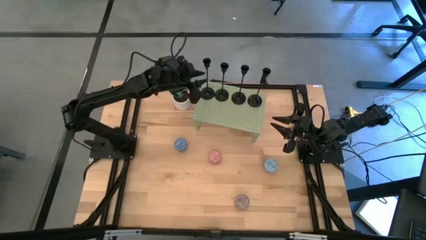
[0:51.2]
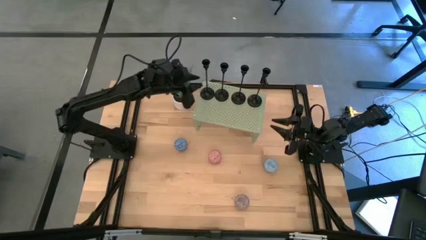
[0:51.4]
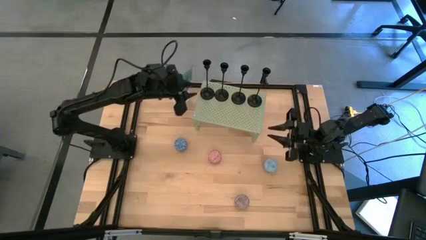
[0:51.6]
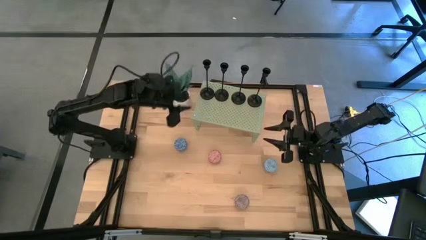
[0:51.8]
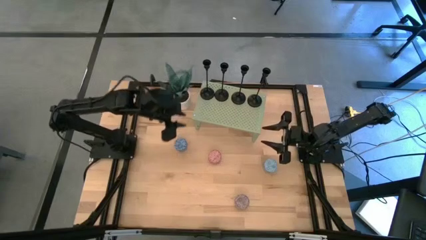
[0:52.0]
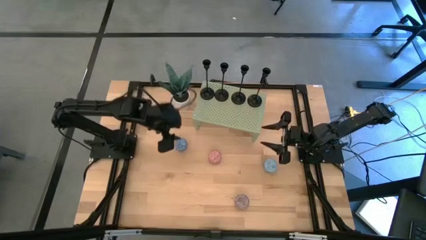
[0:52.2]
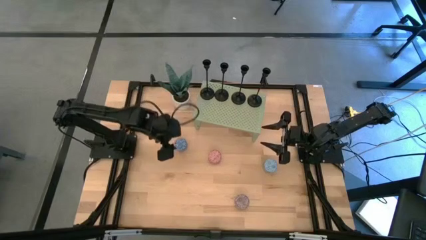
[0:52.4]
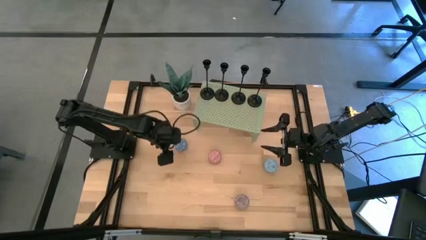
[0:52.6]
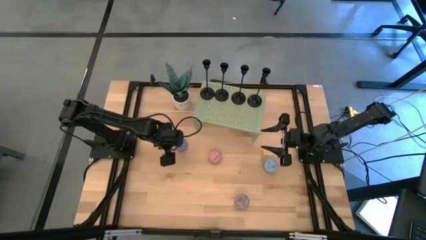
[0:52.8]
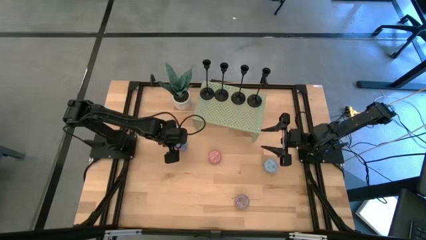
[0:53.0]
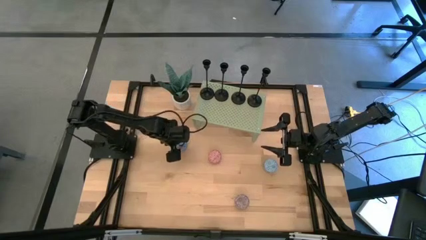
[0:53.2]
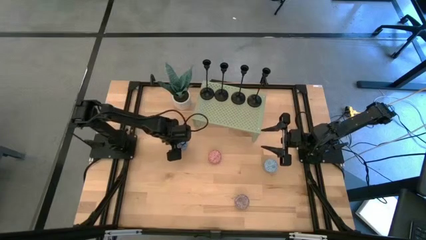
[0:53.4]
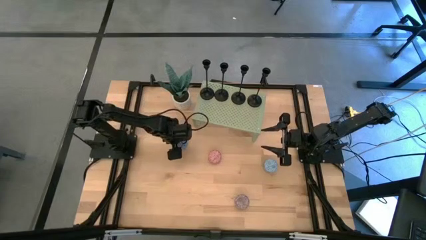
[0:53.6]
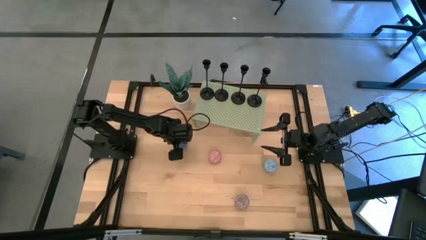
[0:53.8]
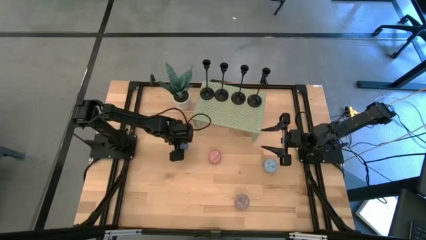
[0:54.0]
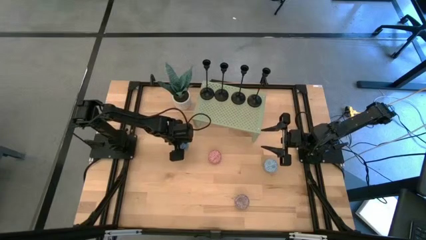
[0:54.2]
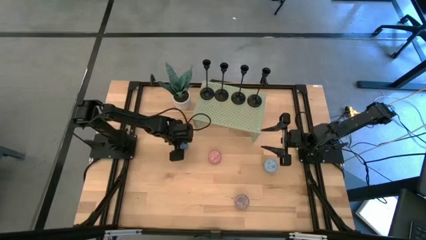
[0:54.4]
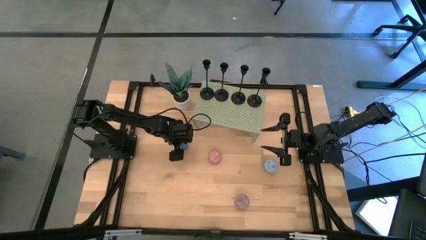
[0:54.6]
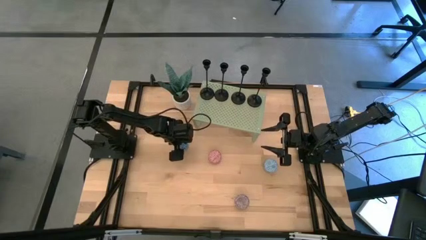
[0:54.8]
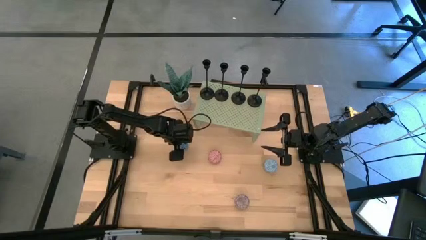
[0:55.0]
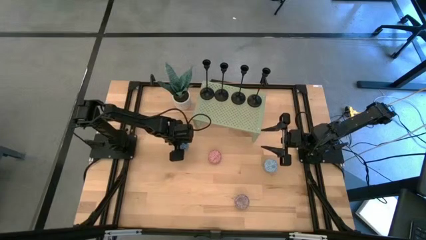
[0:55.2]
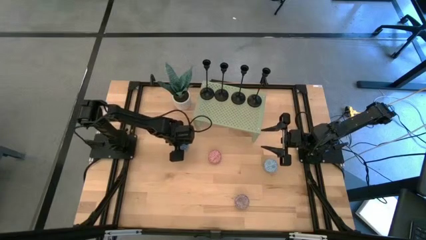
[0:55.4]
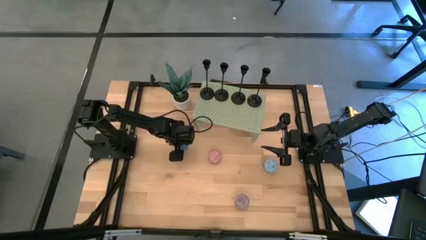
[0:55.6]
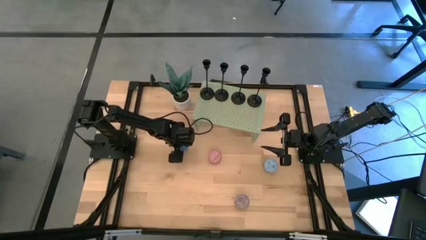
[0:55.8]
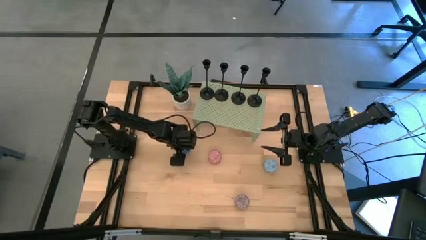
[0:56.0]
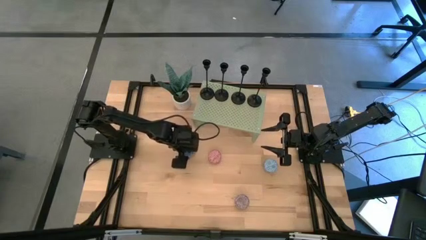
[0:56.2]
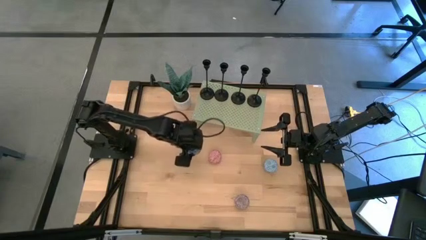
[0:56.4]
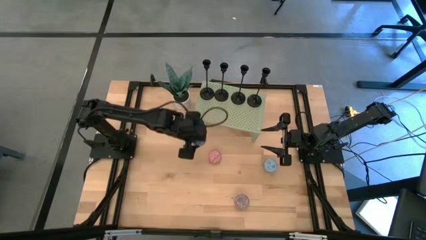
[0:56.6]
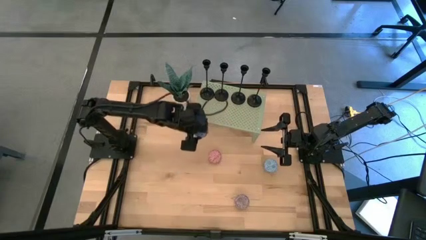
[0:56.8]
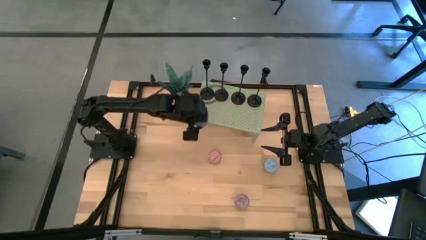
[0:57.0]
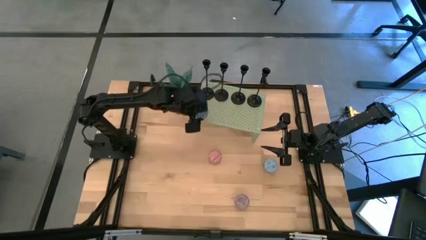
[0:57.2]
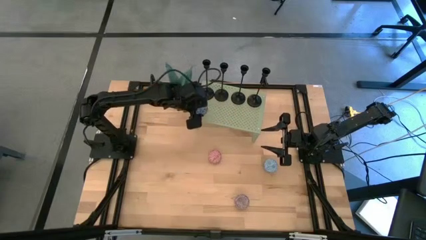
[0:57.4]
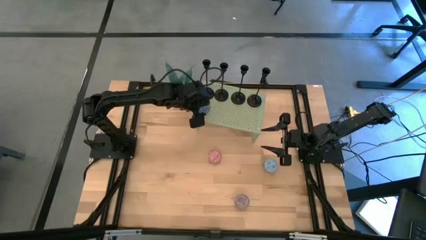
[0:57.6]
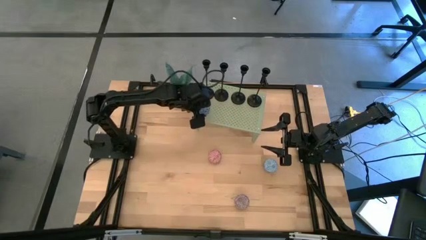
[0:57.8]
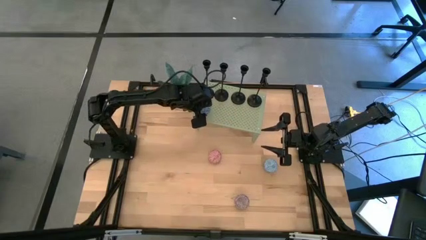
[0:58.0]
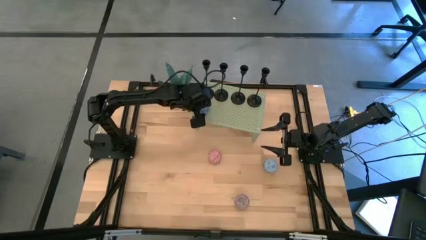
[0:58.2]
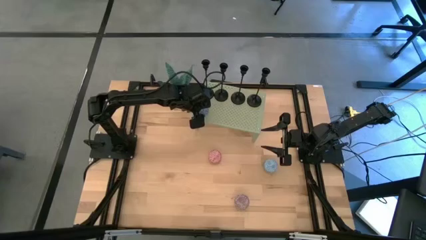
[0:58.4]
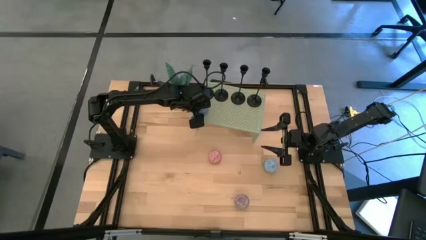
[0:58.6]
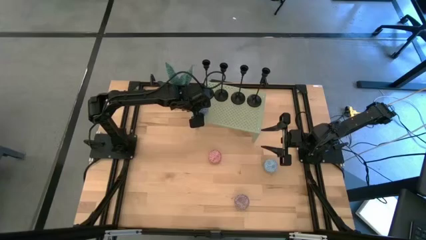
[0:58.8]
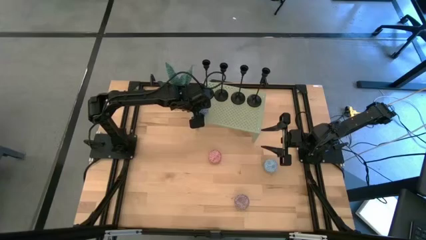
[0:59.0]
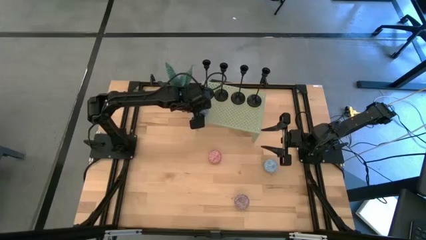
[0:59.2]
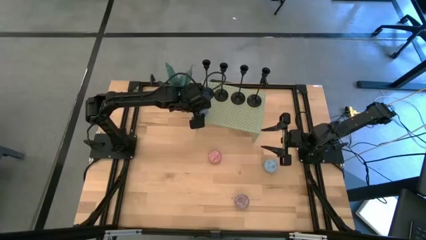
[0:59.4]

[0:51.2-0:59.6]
Task: Pick & Place candle stick holders
Put the blue scented candle on the shelf

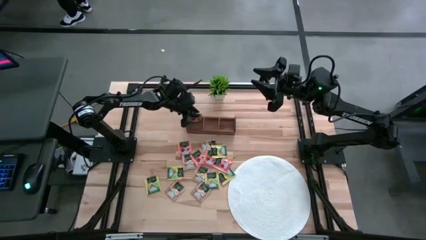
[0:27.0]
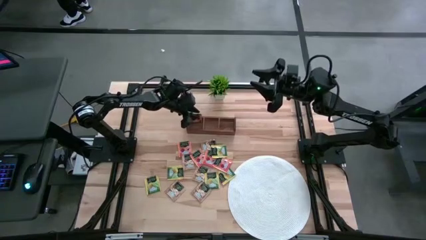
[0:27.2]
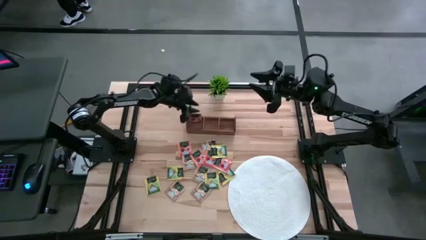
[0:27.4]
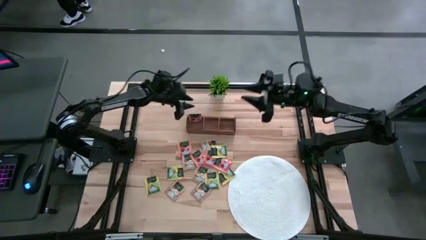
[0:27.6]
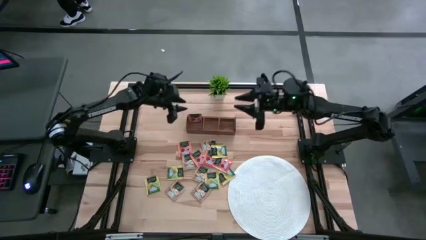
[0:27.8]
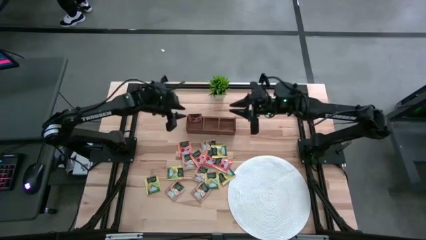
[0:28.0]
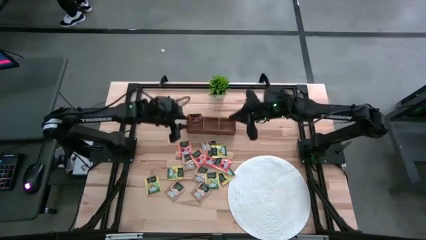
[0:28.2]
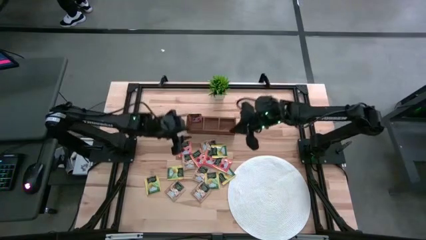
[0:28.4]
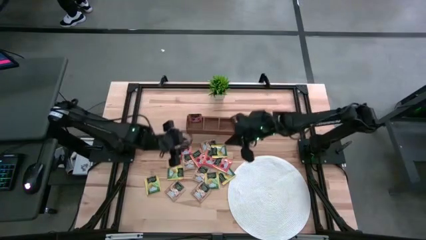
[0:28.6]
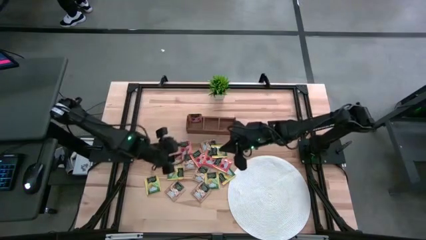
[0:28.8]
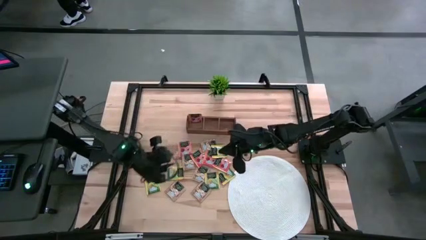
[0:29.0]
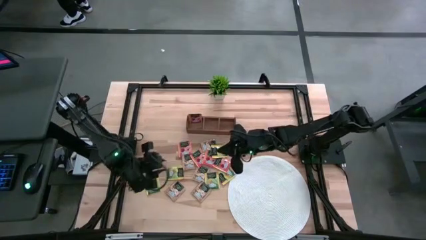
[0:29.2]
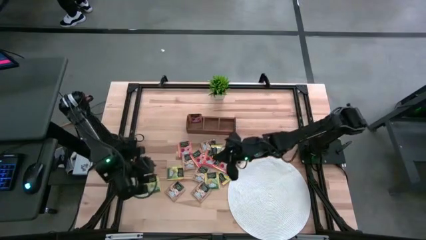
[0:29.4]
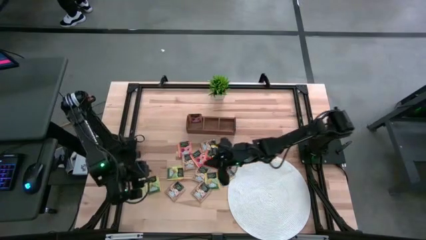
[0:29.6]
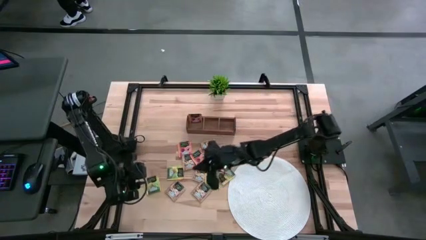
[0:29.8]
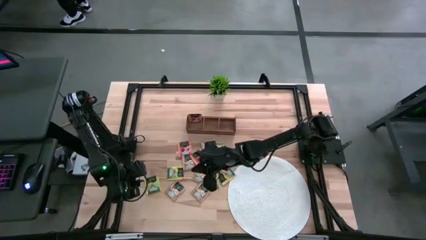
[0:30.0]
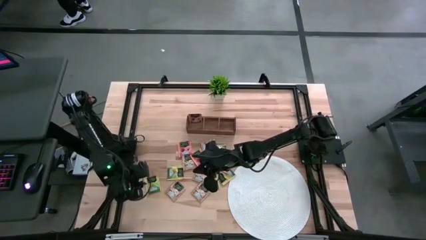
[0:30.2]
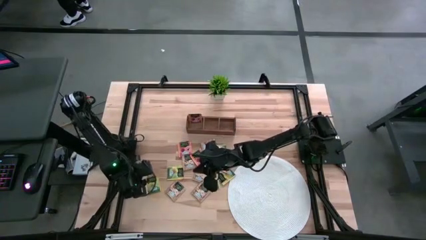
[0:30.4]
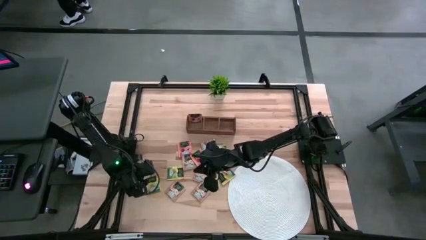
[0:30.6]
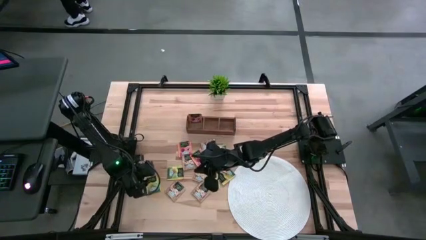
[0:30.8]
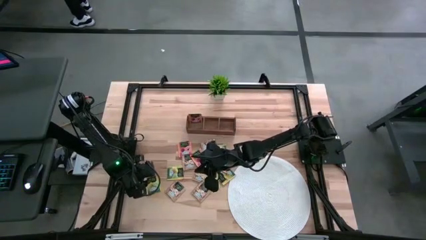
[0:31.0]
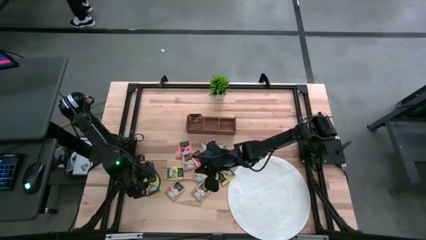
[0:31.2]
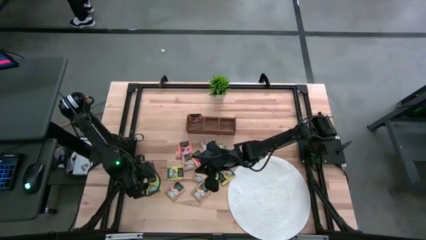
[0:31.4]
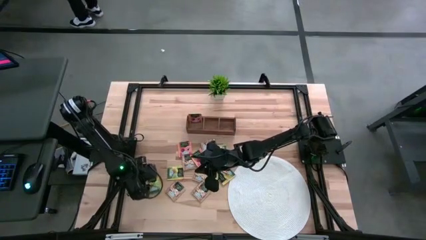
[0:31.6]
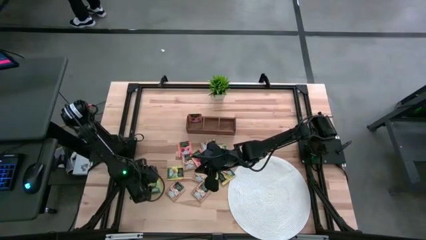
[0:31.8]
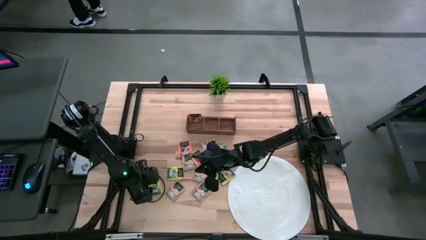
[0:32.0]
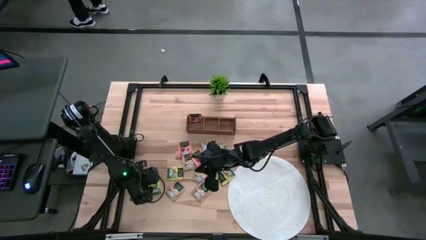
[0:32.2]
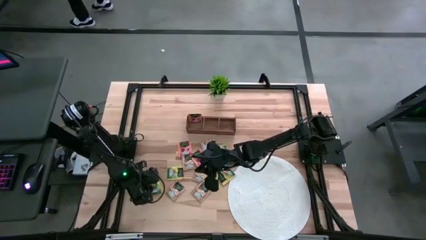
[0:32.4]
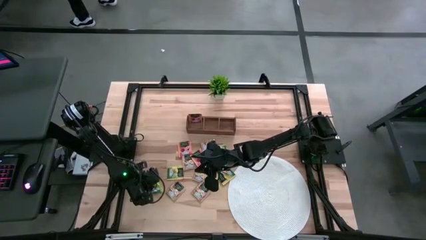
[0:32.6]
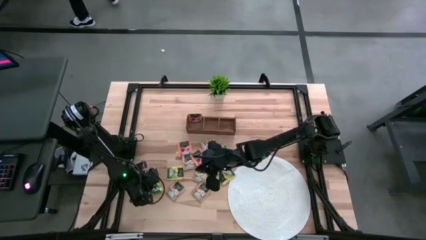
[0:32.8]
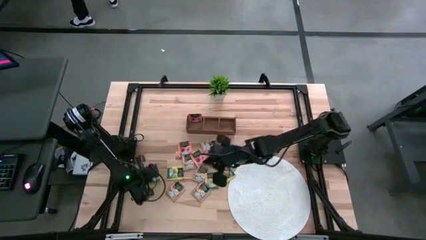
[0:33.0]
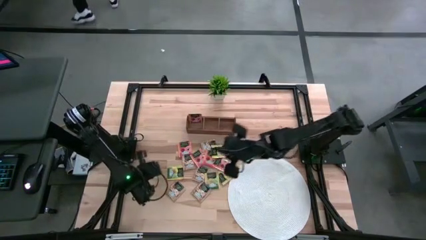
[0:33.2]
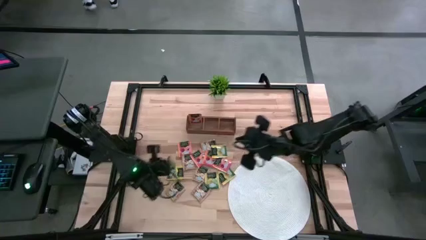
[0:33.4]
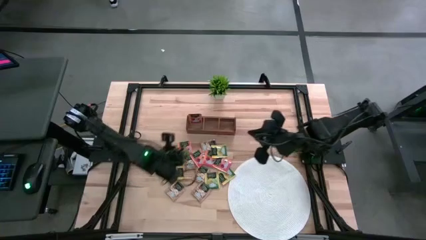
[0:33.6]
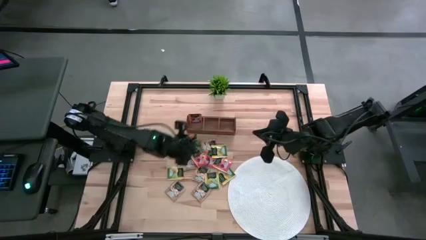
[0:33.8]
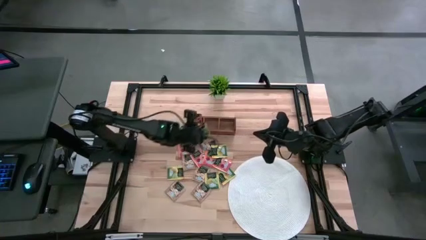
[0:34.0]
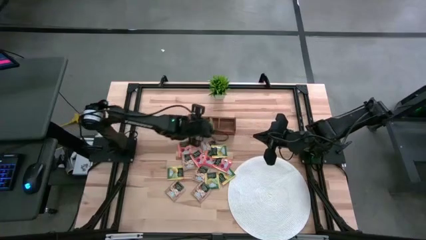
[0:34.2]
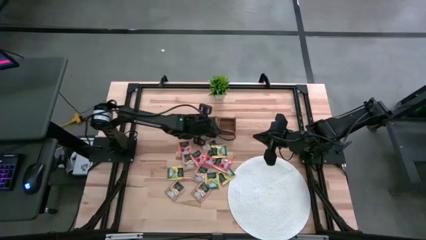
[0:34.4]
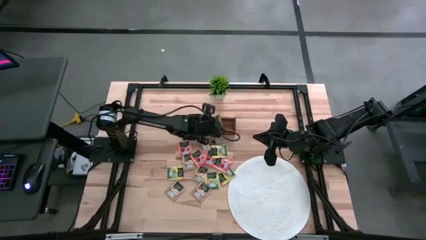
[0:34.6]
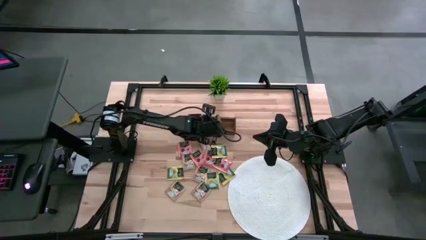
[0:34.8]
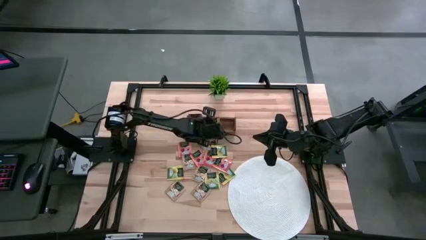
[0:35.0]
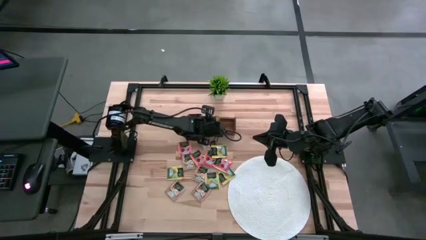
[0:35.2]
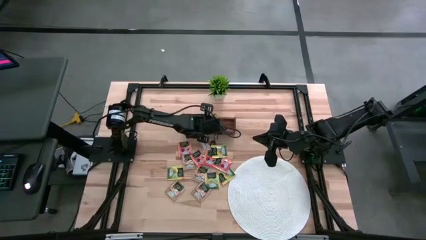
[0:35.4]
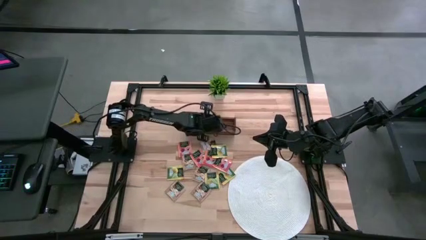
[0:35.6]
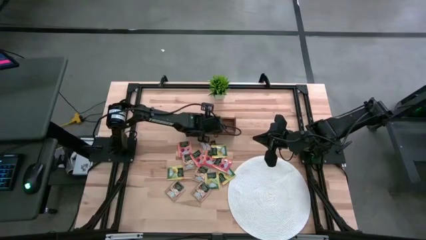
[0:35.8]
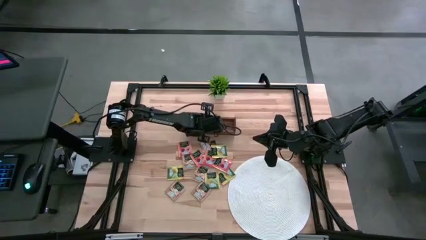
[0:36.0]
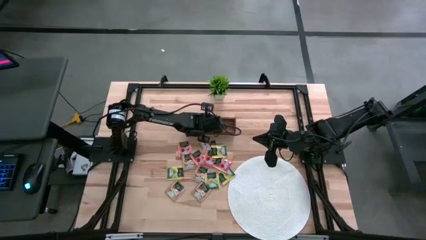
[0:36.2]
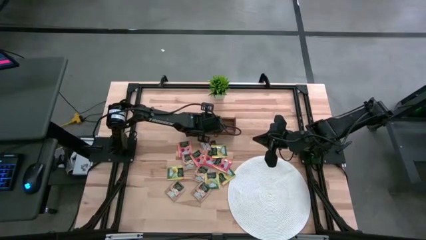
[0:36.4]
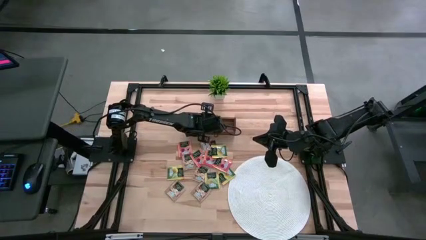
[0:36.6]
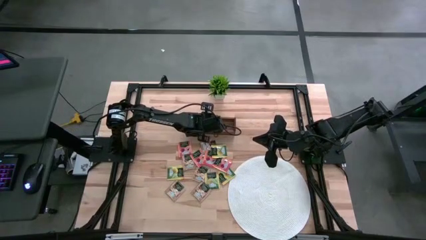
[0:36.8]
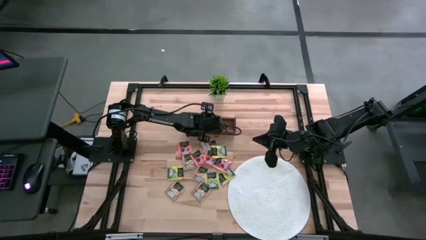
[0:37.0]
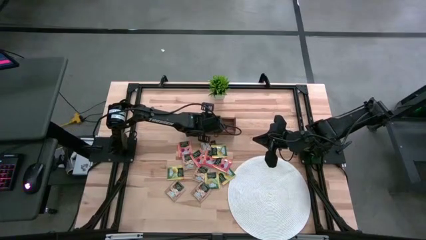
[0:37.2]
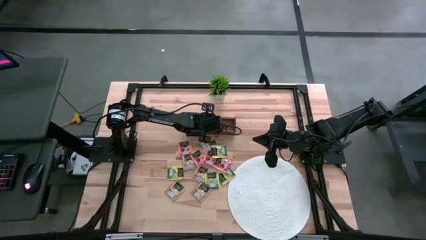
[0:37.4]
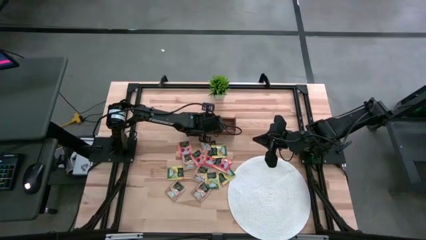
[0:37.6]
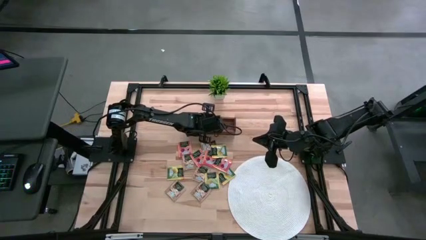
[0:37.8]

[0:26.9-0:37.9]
Task: Pick & Place Tea
Put the yellow tea bag into the middle section of the wooden organizer
